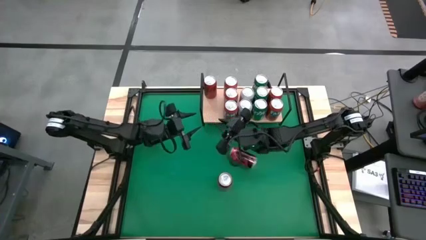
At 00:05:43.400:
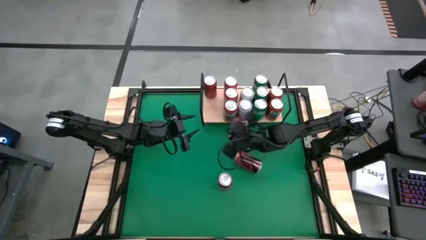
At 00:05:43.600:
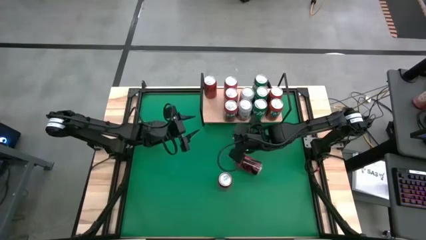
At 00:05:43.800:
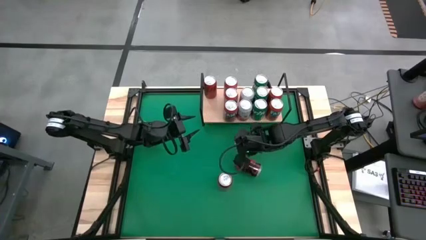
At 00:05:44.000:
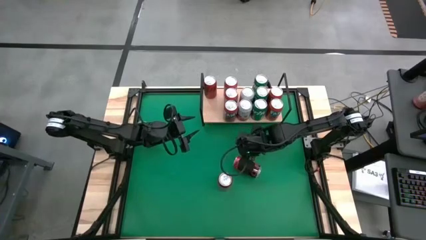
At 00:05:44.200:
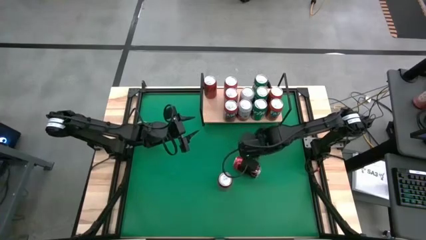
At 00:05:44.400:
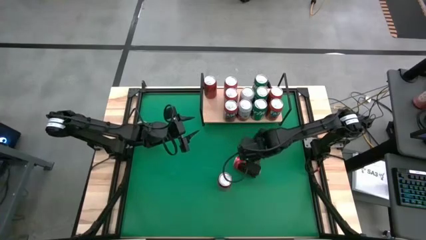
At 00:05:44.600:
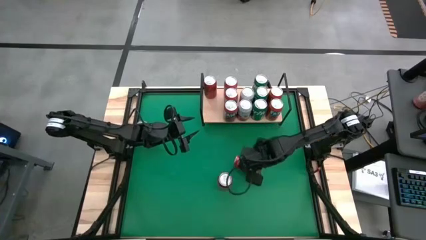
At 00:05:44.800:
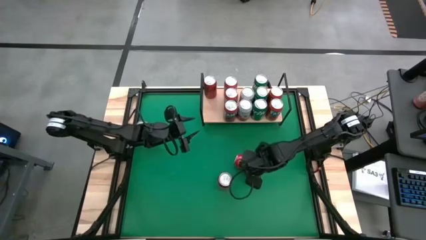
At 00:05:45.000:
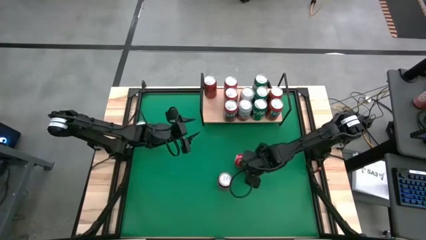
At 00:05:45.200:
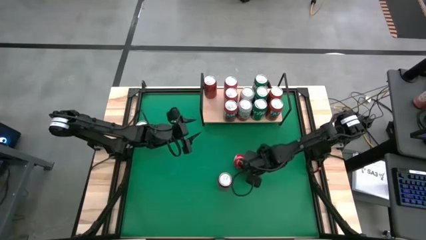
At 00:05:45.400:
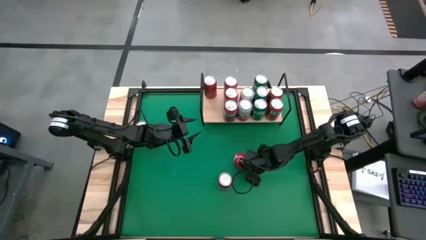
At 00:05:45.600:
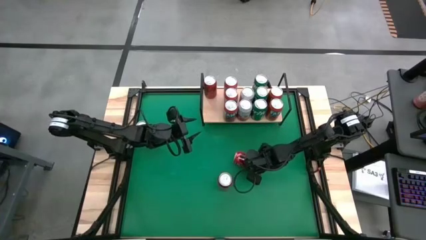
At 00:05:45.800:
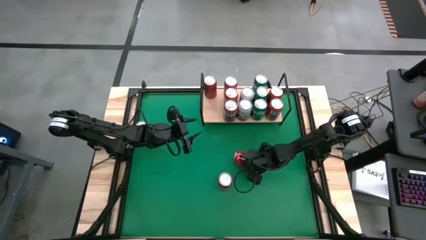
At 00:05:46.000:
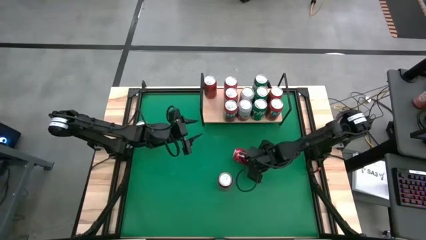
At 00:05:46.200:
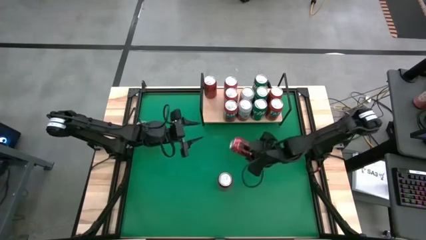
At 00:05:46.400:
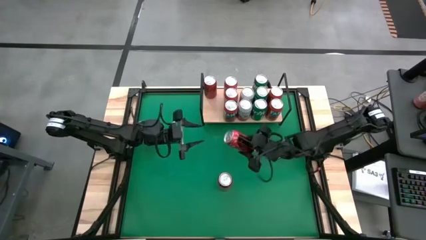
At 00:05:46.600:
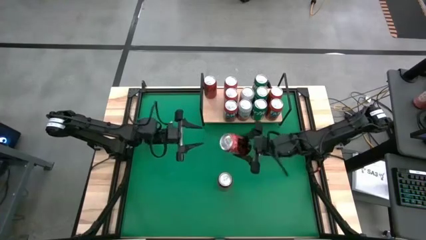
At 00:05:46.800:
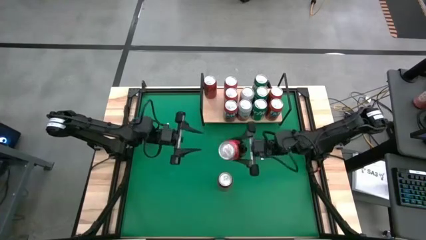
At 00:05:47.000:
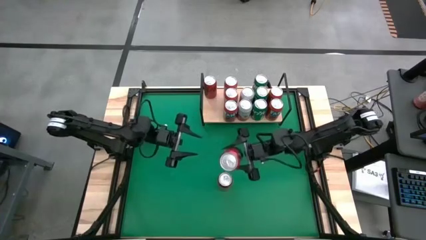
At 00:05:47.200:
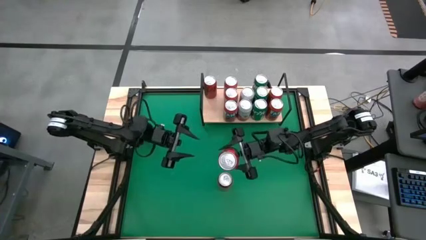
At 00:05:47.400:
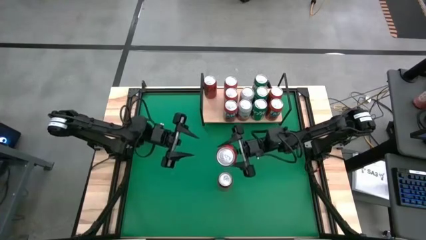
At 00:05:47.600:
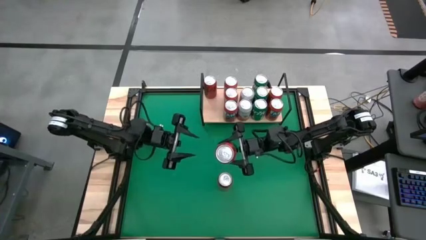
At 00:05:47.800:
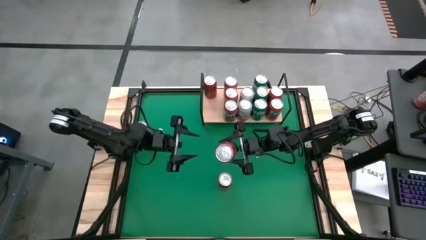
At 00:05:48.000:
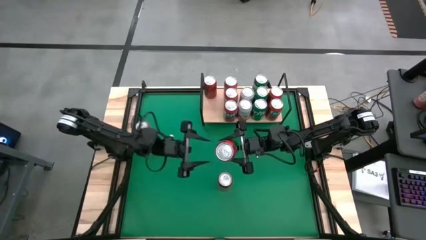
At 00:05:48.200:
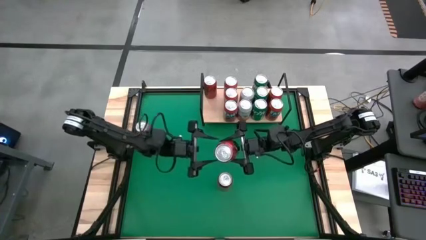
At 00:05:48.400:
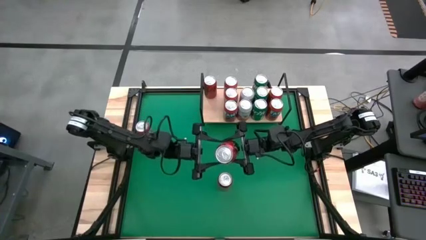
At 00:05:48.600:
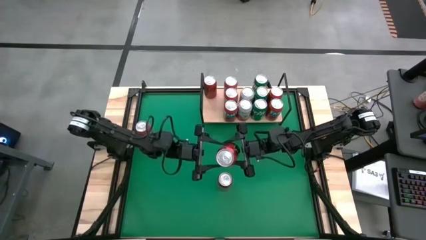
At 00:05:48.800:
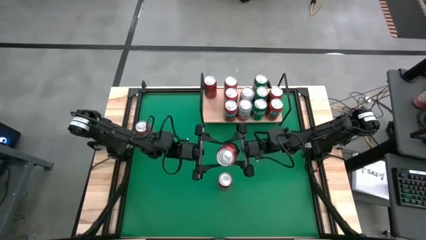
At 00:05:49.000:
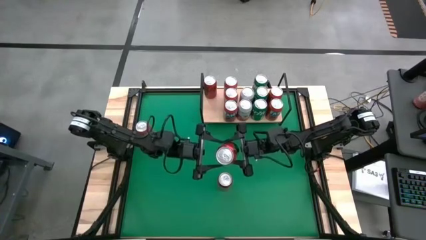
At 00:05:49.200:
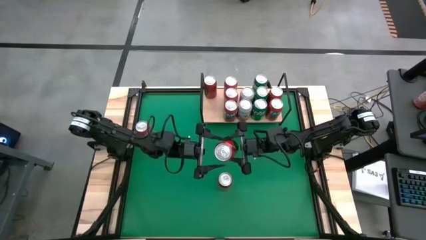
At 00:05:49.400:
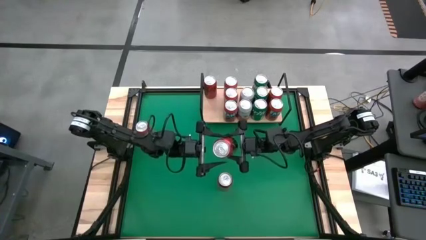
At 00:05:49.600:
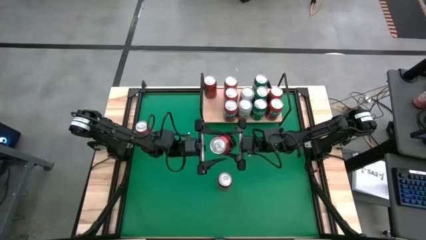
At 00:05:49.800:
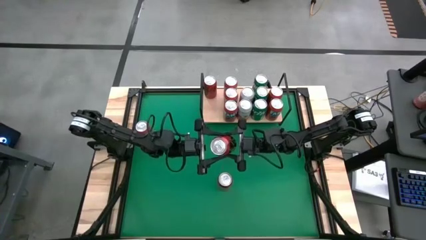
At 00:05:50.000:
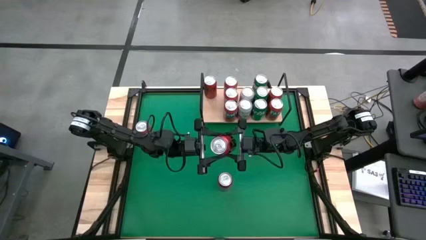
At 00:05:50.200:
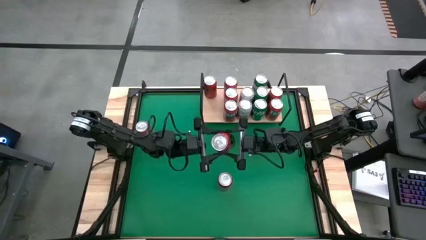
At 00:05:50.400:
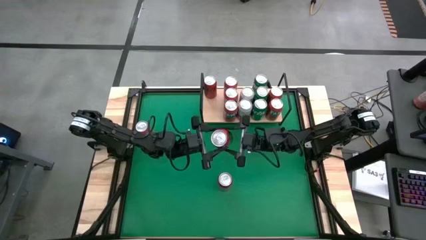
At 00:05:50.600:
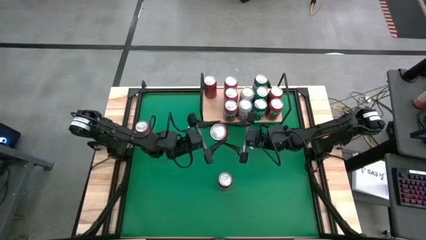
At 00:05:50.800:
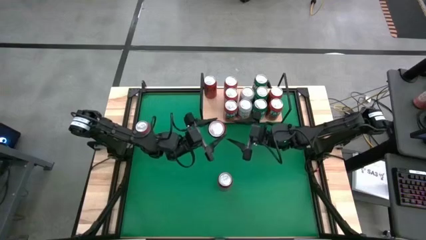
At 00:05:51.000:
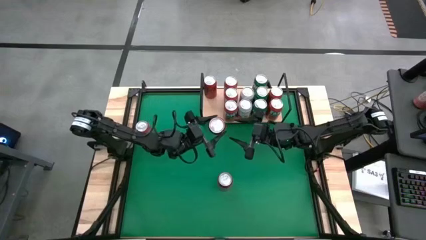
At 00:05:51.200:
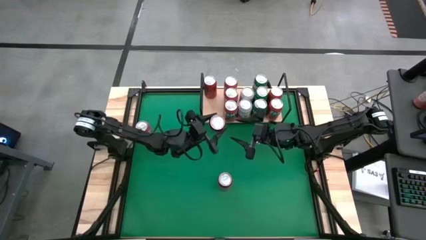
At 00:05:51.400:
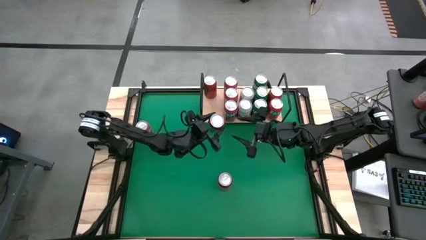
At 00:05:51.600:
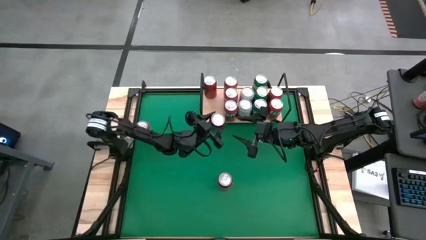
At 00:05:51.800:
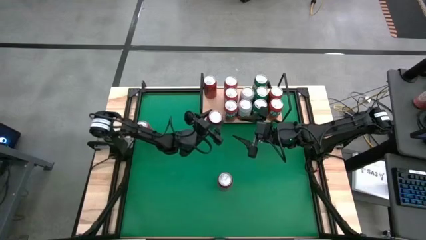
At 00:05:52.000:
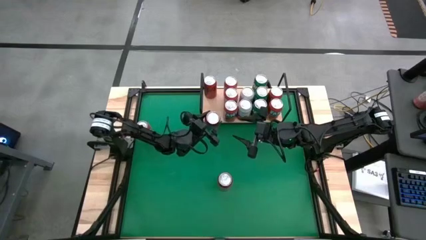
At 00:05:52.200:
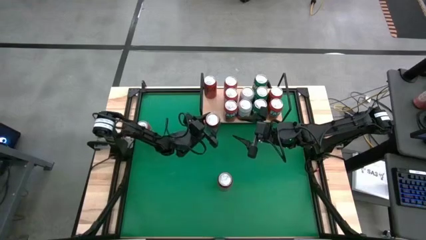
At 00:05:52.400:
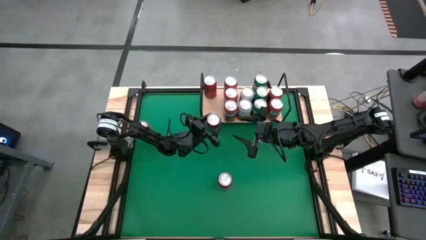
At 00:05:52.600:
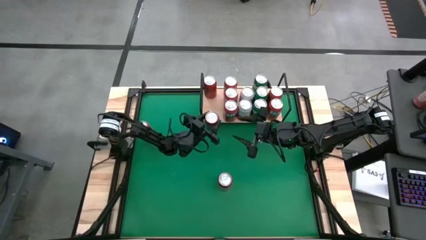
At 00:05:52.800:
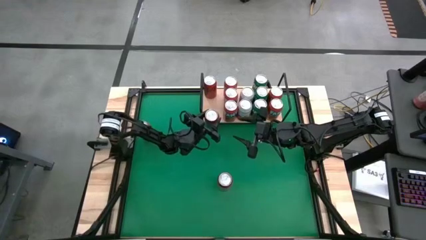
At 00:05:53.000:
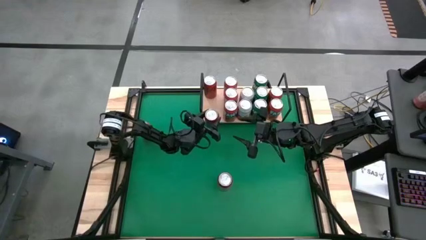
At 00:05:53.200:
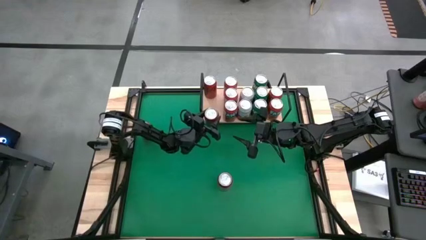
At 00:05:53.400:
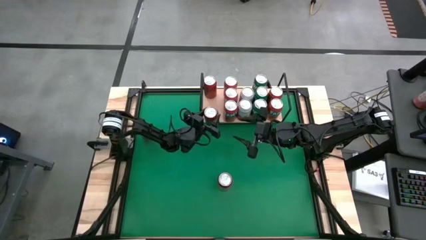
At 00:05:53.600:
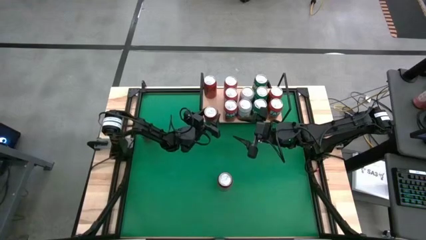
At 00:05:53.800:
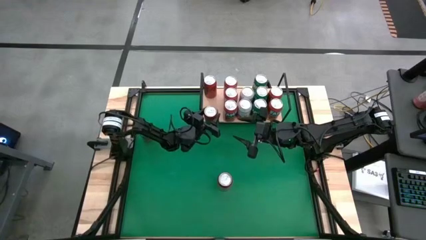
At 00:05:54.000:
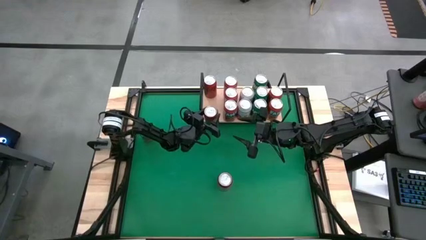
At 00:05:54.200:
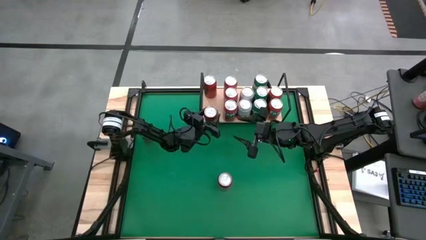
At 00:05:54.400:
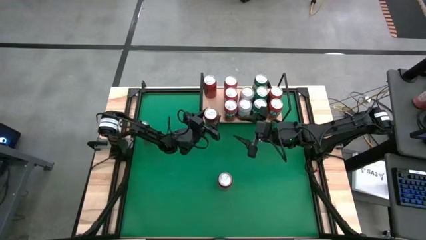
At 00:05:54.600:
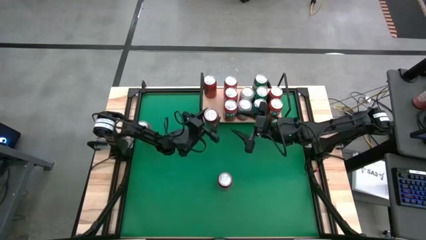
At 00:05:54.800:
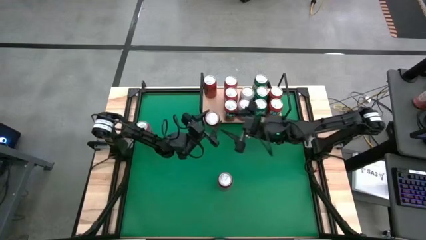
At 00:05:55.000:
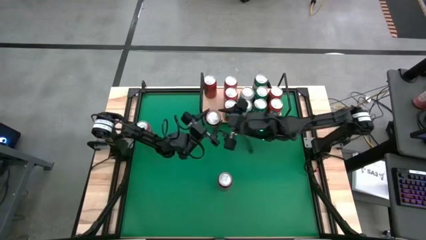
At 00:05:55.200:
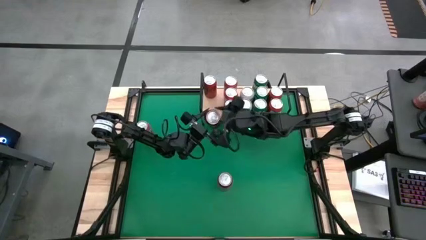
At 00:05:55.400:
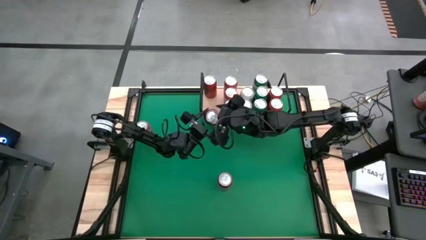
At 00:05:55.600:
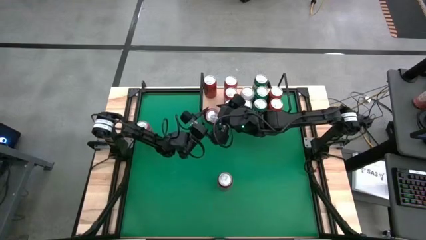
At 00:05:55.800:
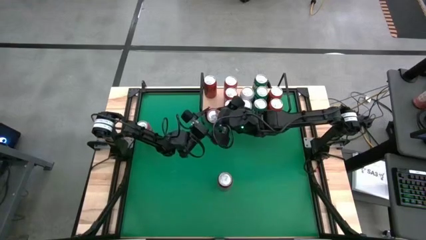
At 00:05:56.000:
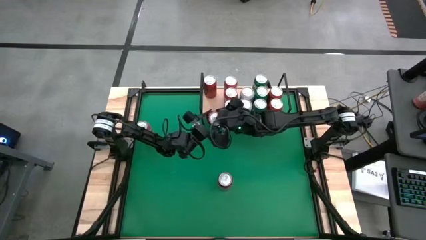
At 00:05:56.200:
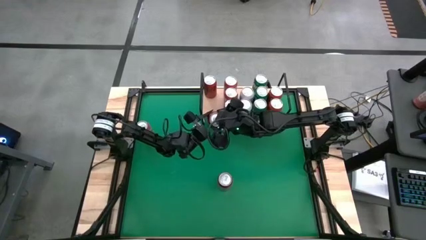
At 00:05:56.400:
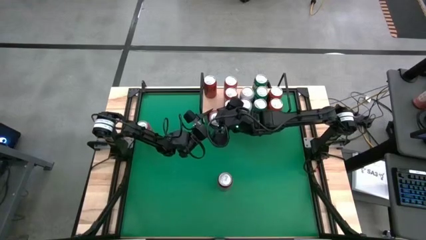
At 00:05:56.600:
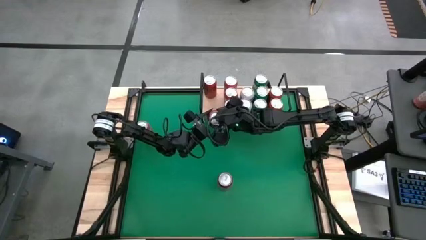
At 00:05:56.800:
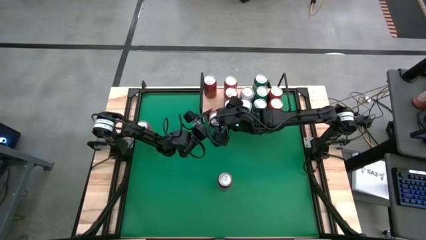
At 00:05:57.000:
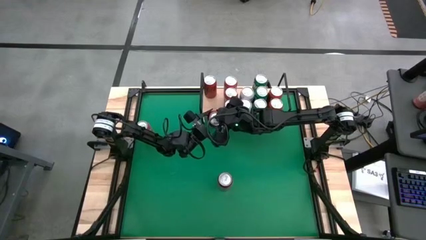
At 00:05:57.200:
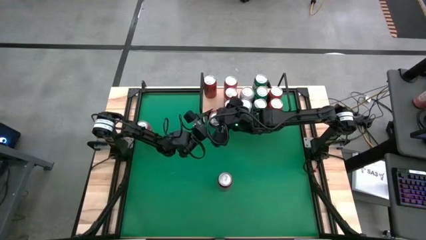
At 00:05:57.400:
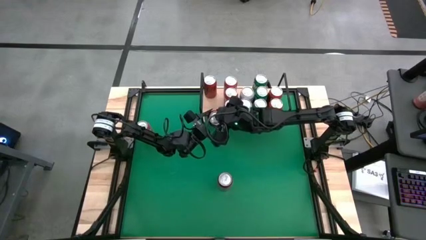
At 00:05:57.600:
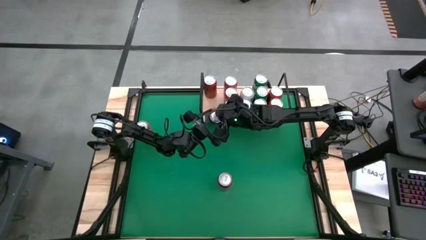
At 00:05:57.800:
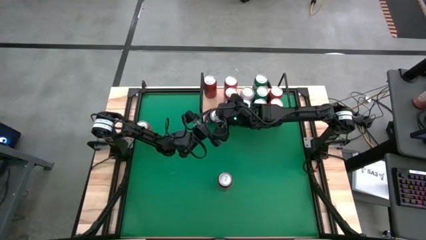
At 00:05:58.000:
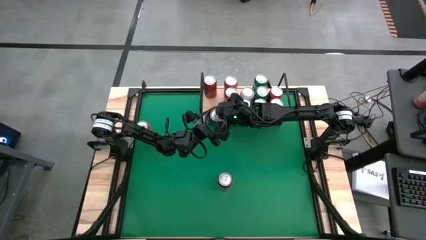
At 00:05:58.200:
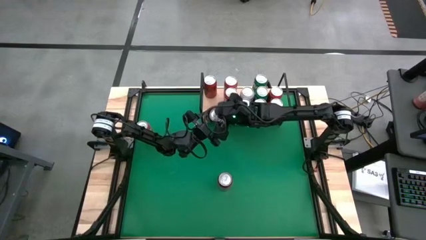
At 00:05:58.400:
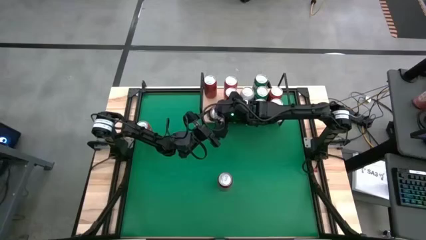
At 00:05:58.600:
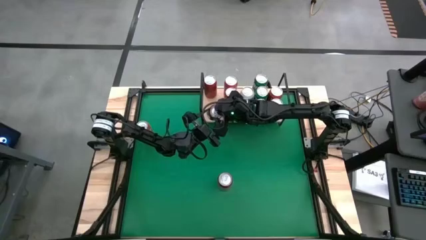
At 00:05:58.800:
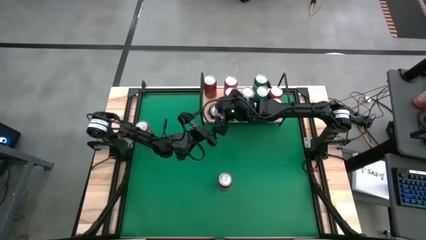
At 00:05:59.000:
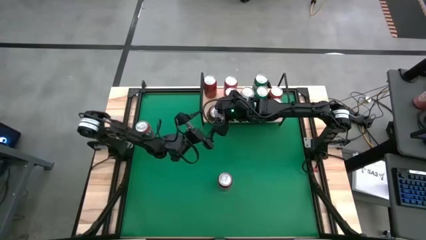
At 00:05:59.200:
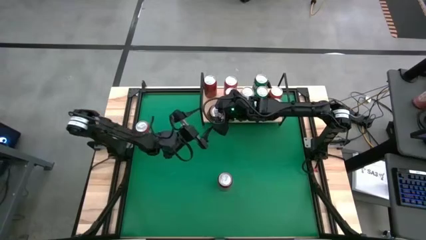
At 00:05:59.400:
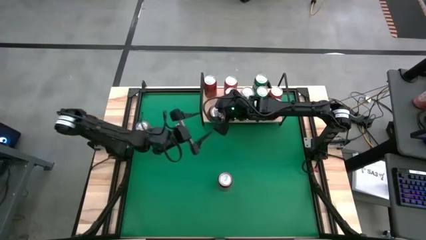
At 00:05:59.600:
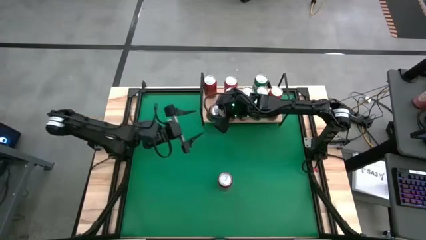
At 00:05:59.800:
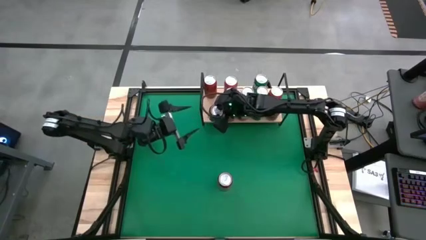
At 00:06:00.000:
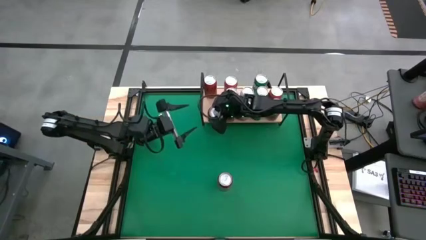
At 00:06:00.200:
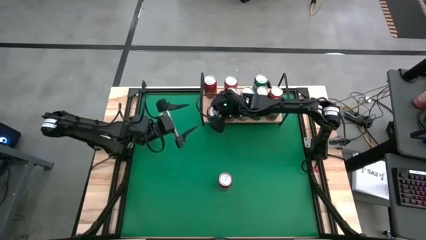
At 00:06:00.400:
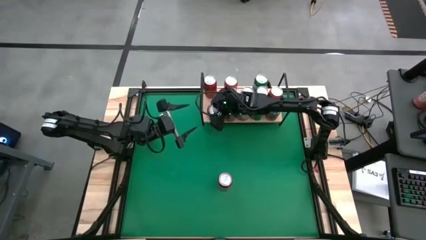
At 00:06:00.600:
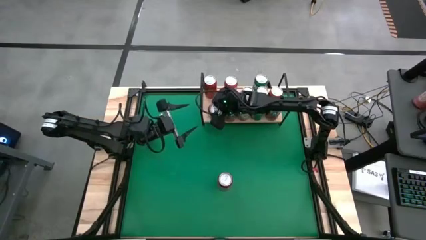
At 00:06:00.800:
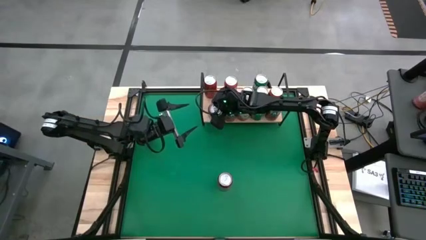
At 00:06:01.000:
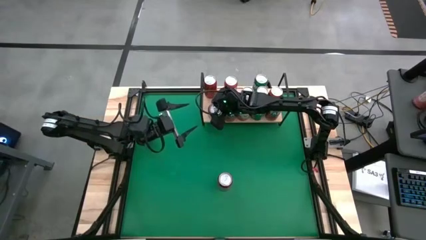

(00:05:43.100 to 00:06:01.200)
Task: Place canned beverage on shelf
Put the red-black soda can on the shelf aligned with the other red-black soda can
